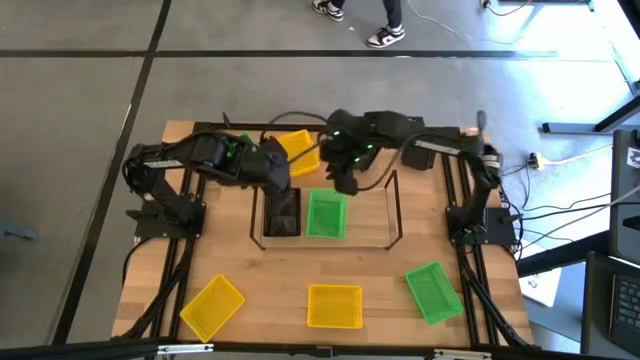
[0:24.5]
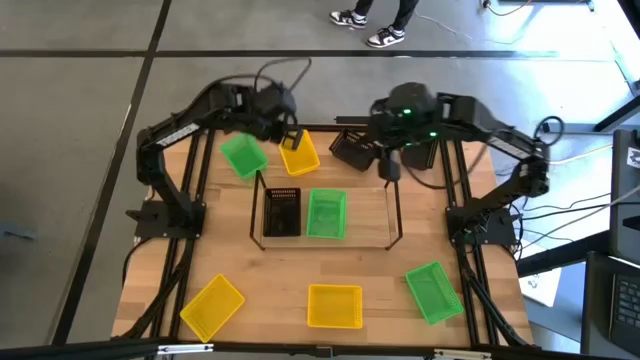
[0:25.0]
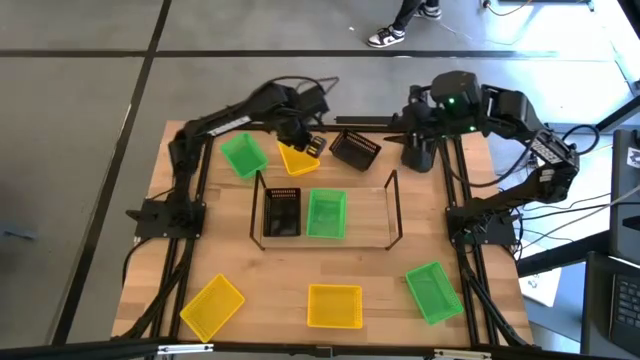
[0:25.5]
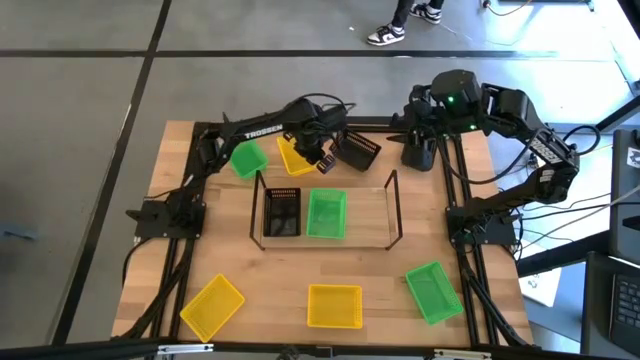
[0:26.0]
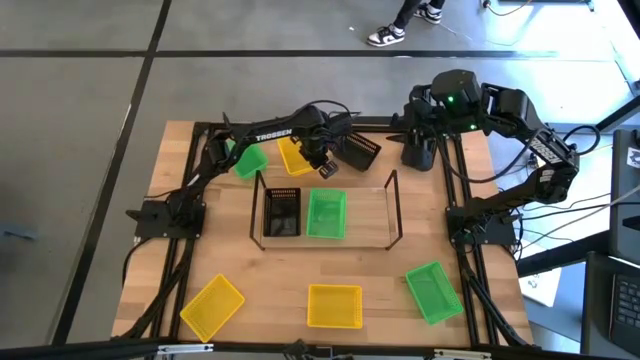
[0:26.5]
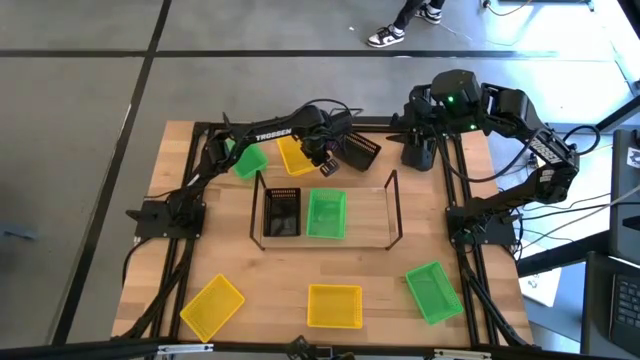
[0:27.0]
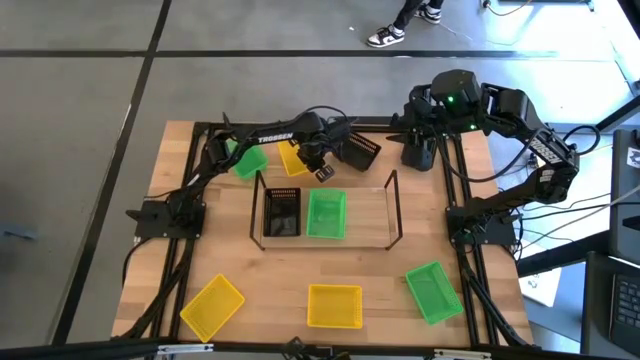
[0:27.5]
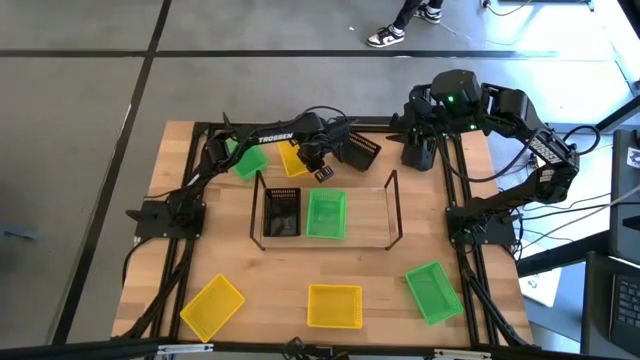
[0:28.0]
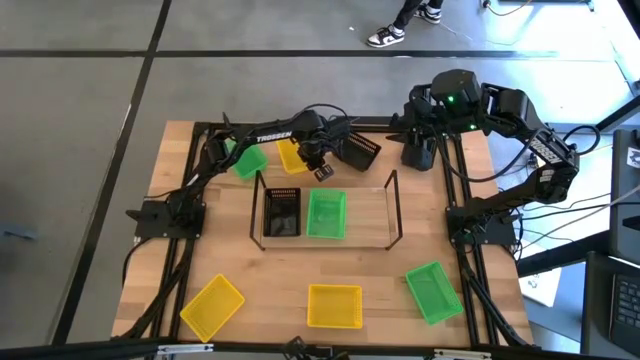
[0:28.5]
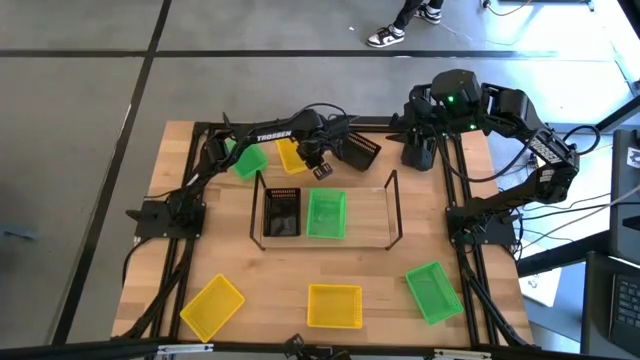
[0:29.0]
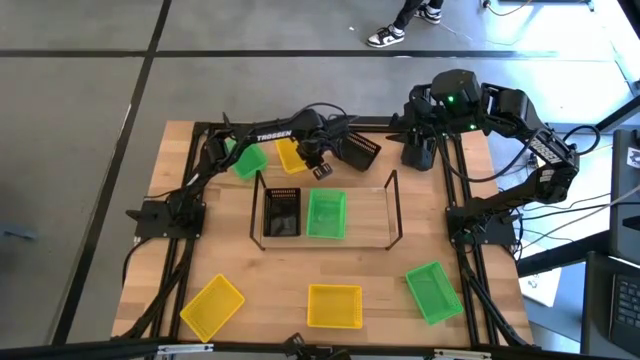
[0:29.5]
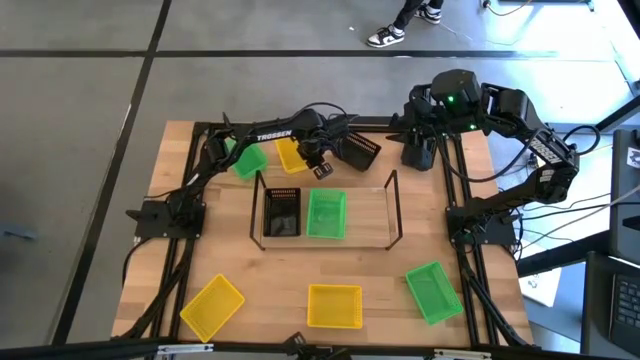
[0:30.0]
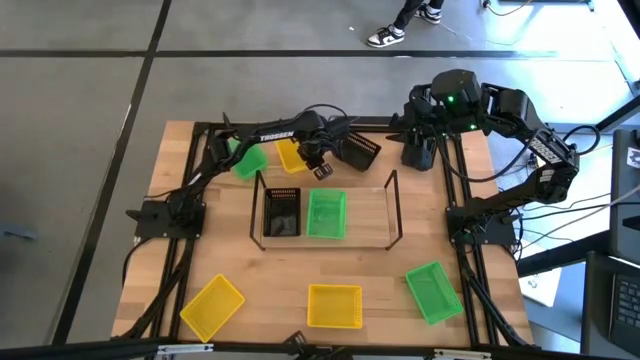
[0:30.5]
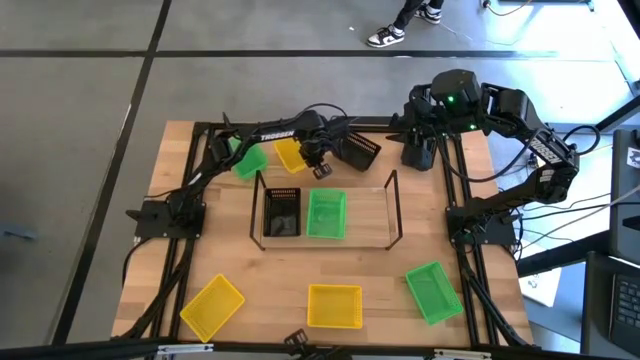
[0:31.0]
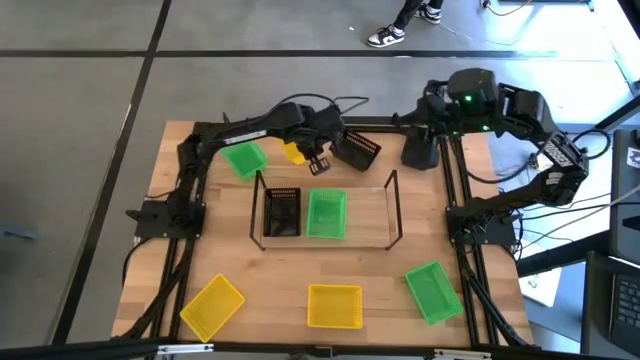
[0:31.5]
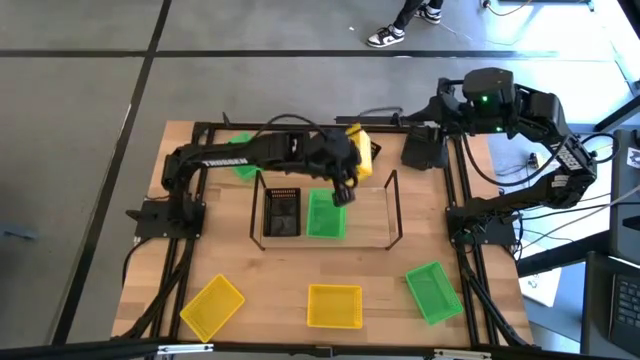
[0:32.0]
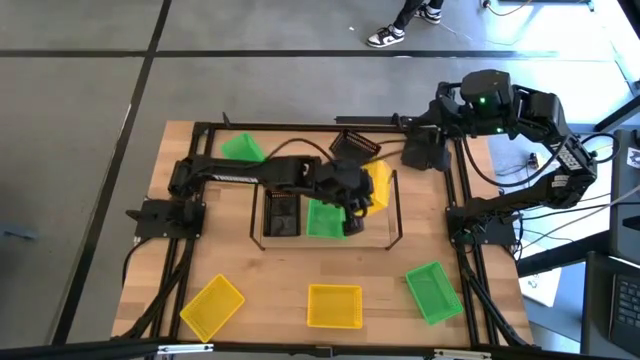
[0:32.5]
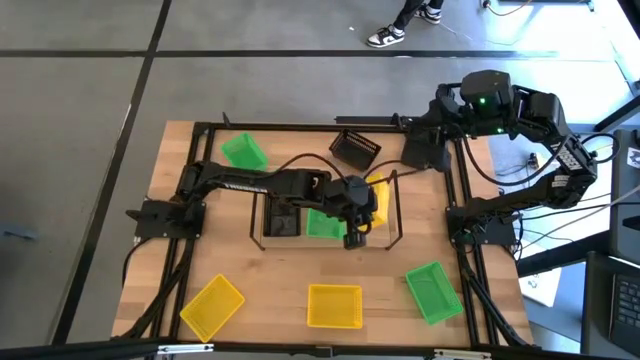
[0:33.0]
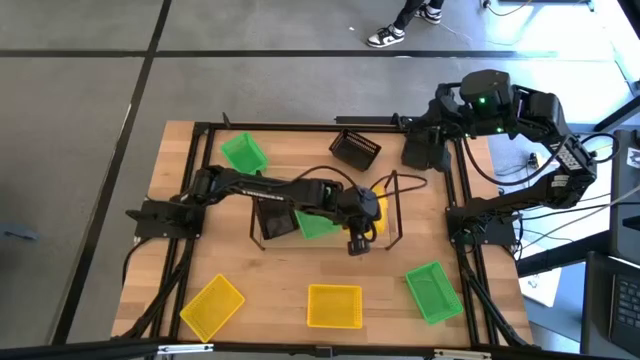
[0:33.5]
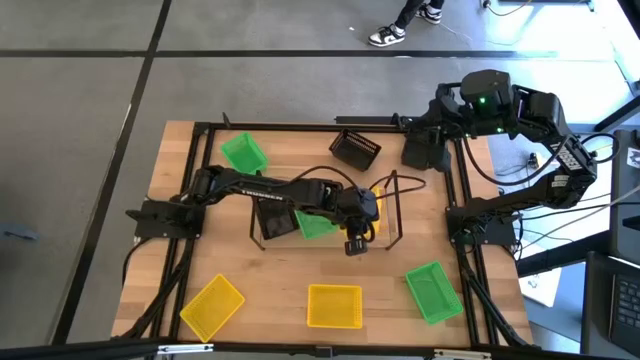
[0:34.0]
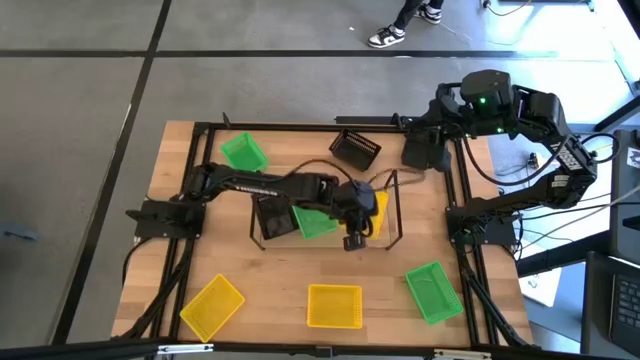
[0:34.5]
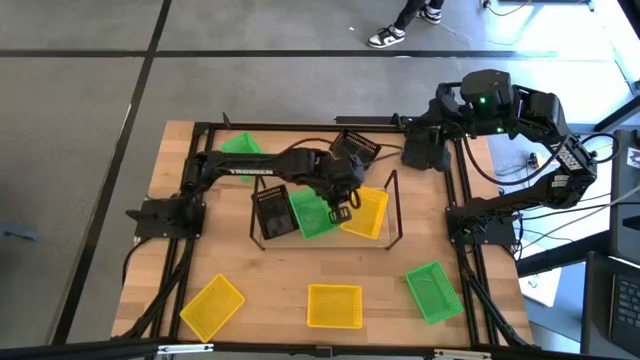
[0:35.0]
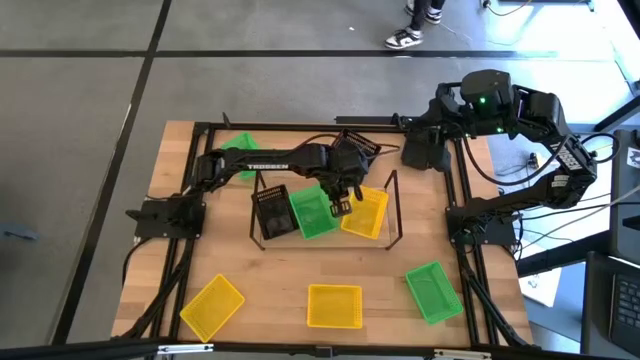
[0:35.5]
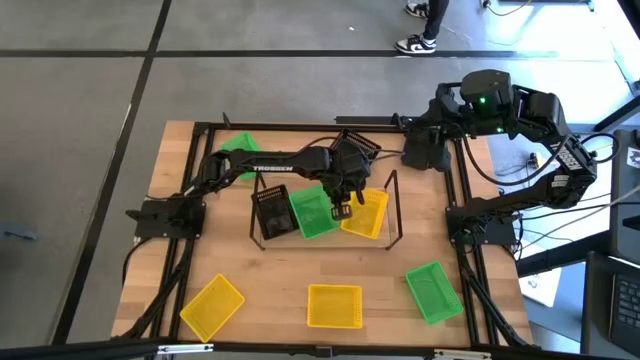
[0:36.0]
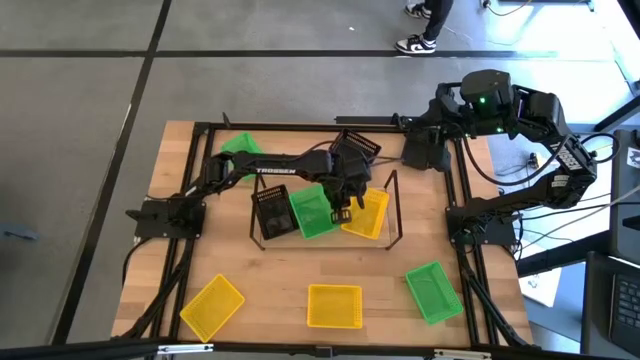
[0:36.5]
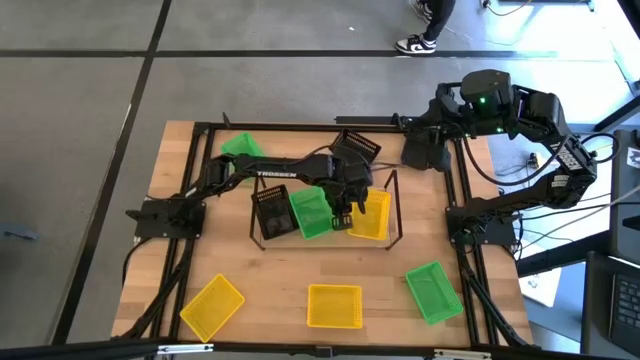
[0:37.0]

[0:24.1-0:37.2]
Task: Stack baskets on shelf by color
Put the top yellow bin on the shelf

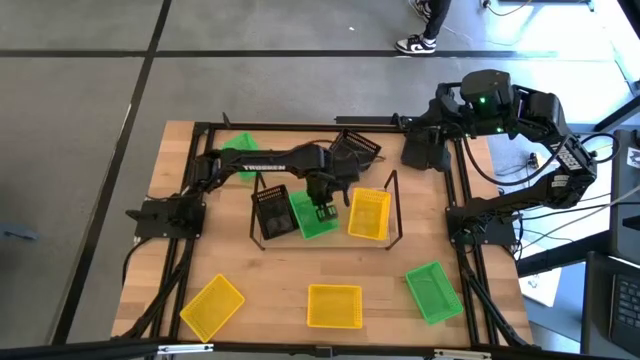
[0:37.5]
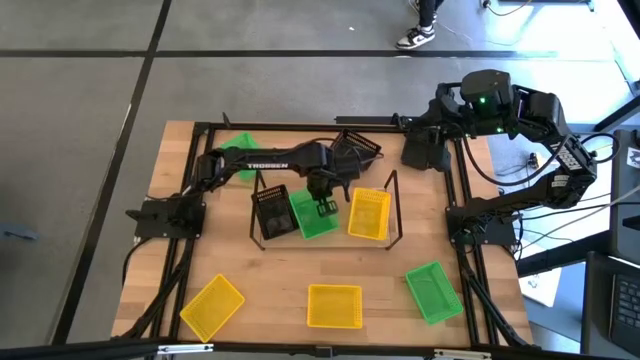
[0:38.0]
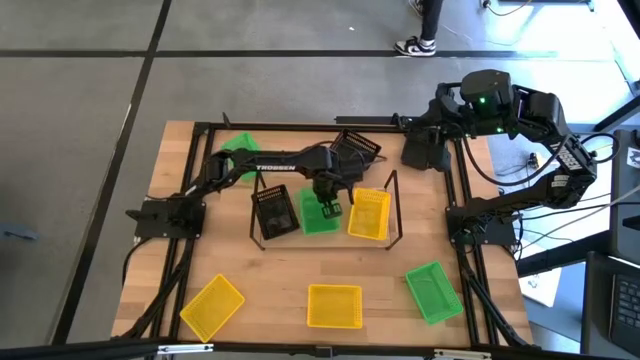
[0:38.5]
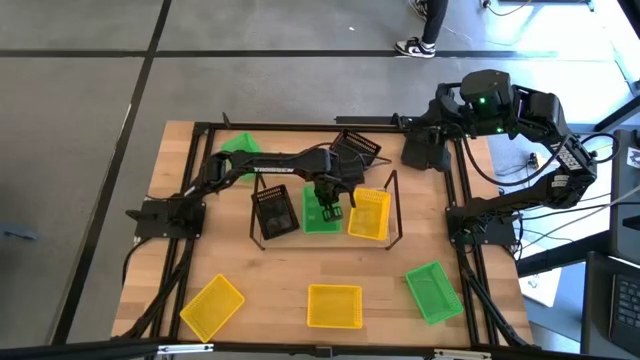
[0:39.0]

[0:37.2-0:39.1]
Adjust the green bin

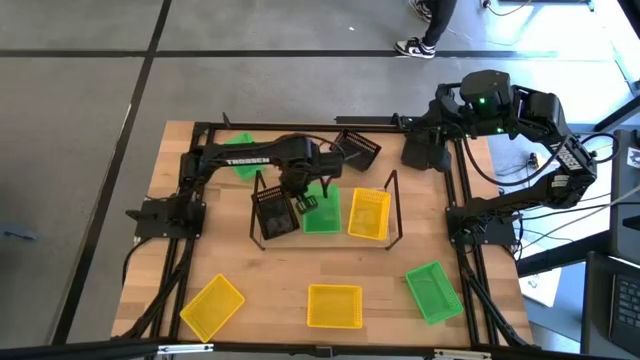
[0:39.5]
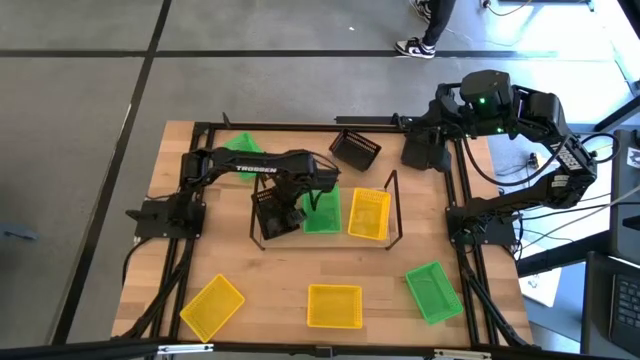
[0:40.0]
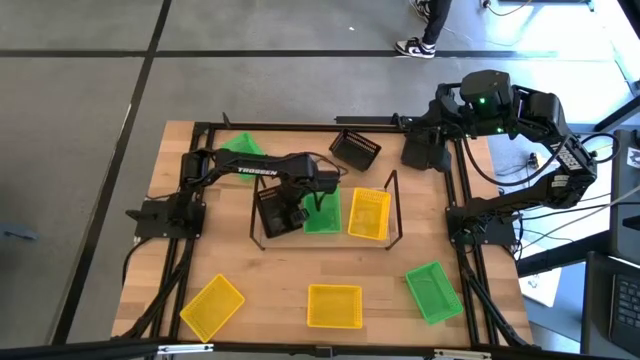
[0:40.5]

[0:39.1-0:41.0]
Adjust the black bin

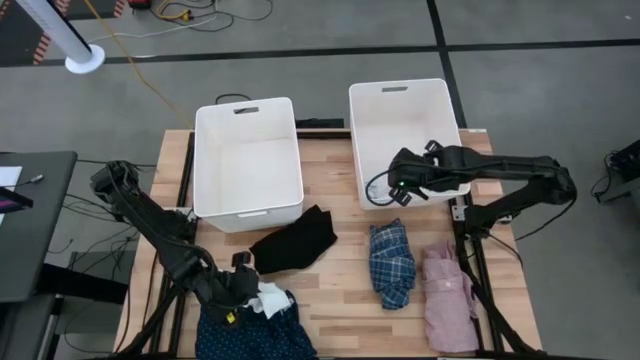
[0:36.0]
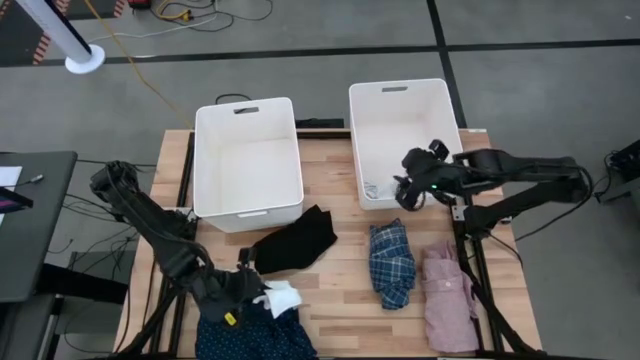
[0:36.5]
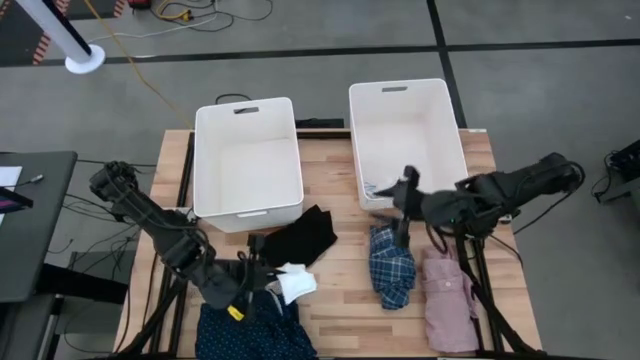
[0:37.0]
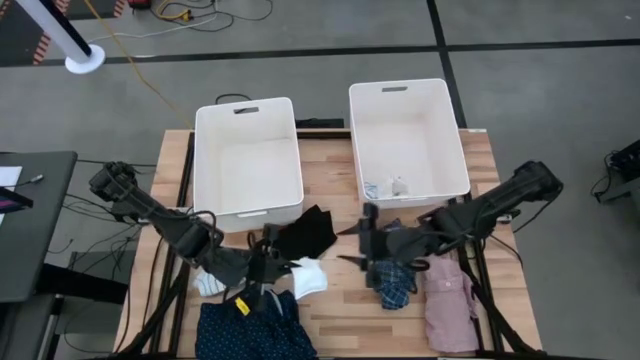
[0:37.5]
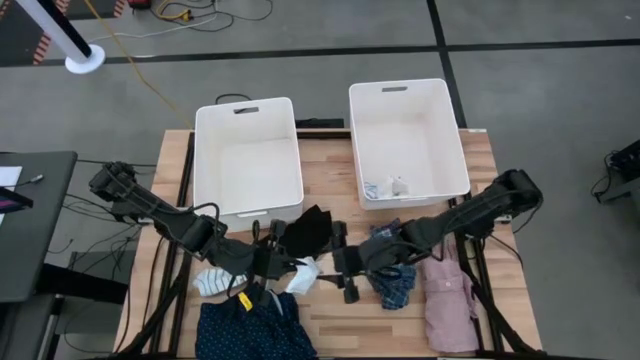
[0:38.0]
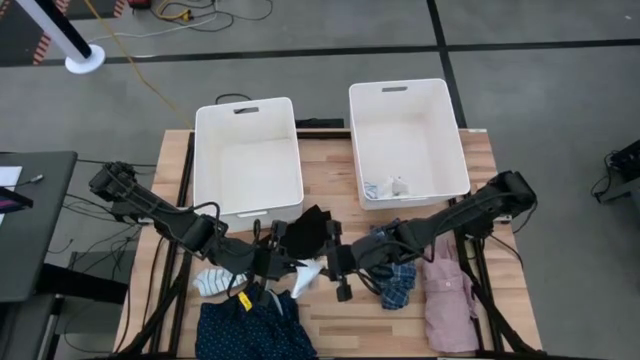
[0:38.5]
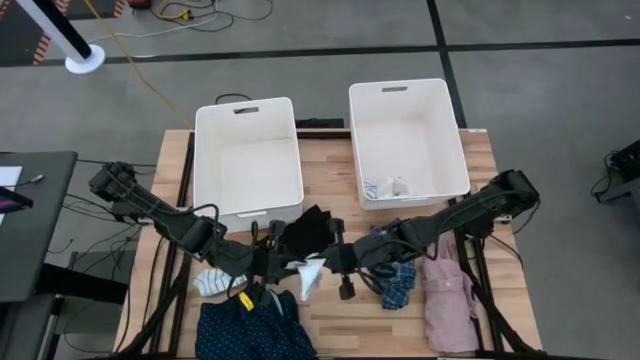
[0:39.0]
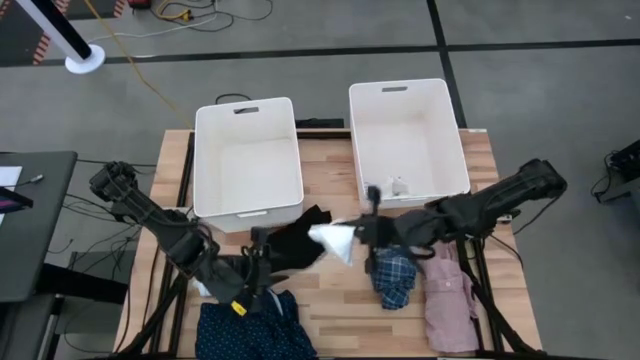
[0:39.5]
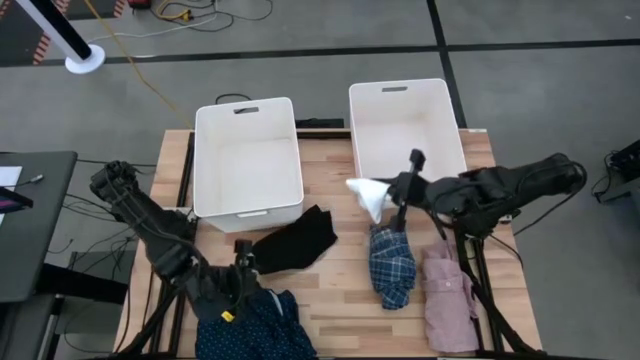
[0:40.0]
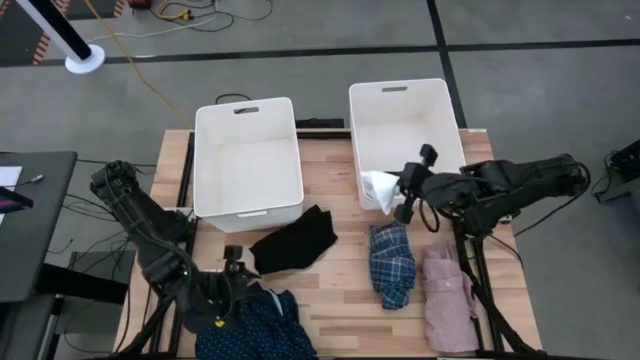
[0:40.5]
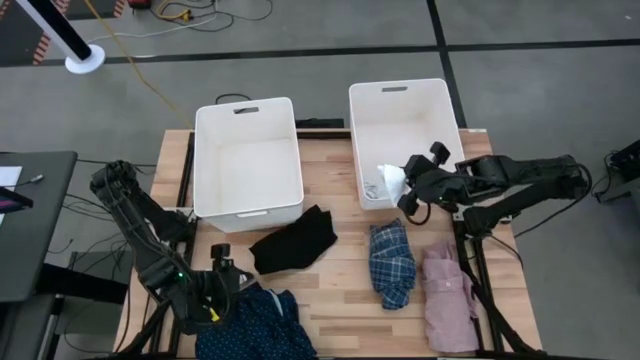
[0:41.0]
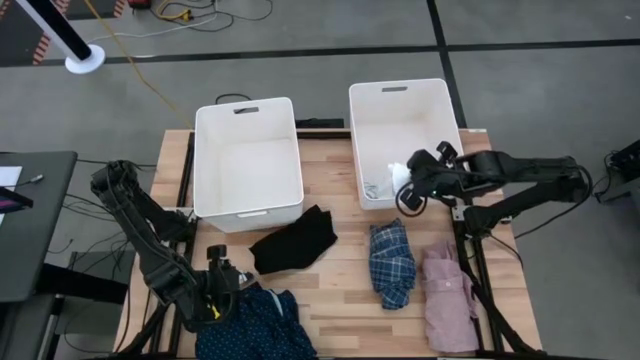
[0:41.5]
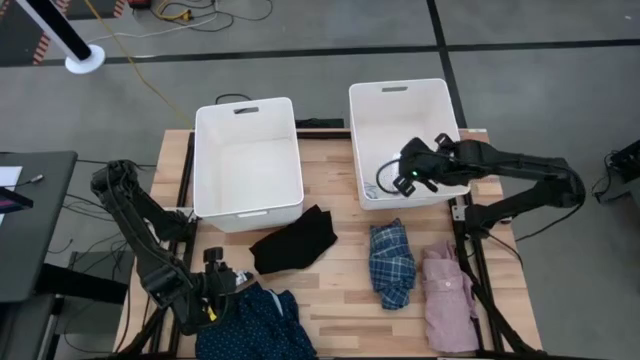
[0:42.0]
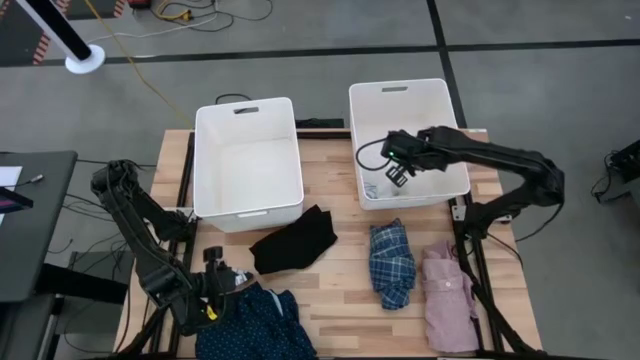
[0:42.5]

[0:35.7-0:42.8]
Task: Sort clothes
Put the white sock into the right bin
